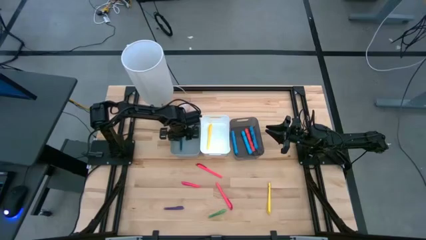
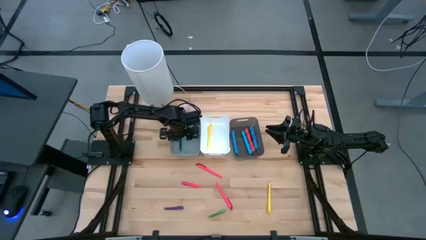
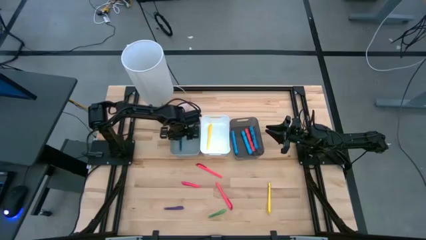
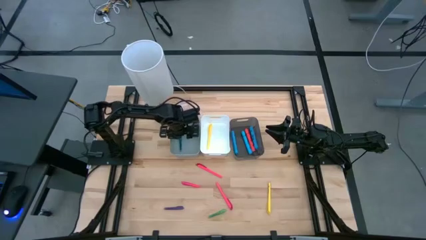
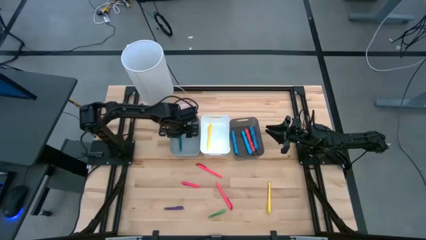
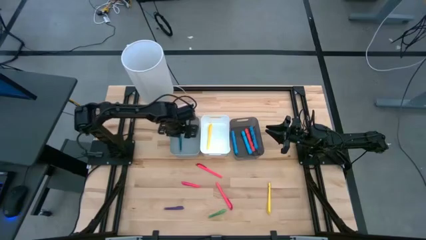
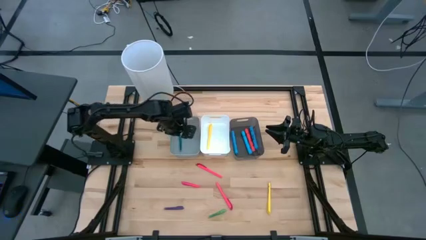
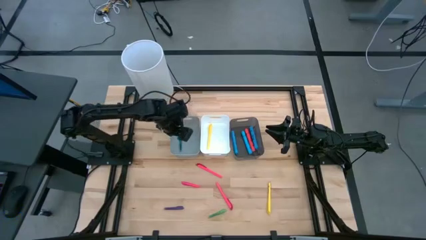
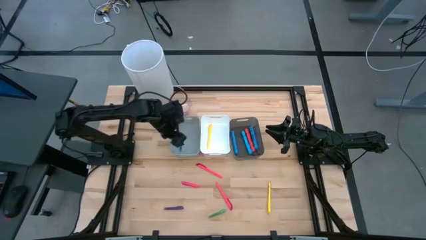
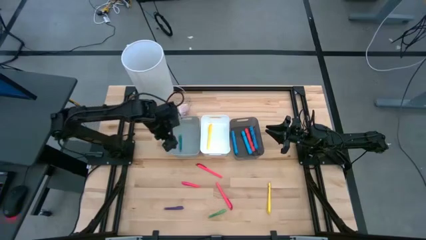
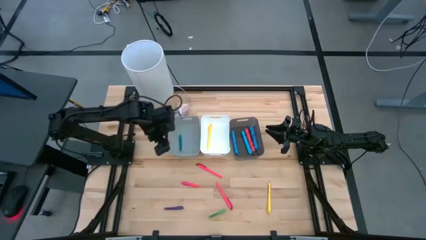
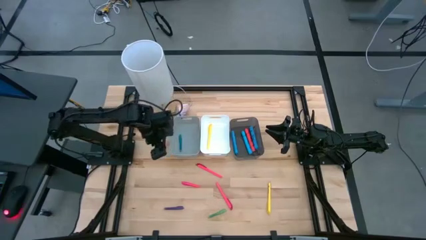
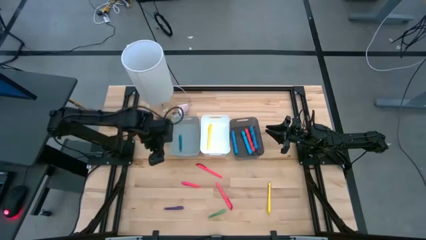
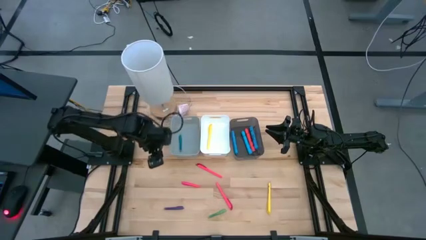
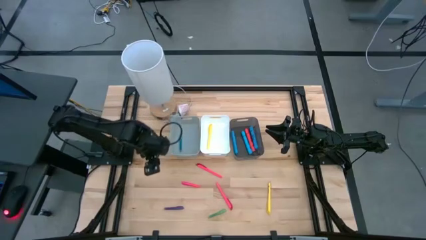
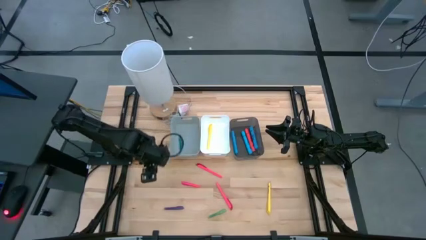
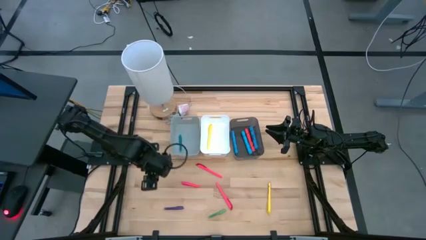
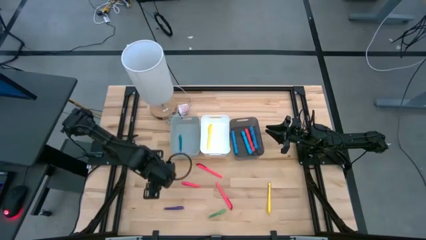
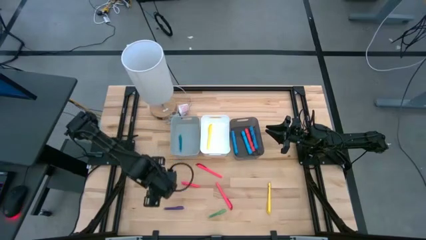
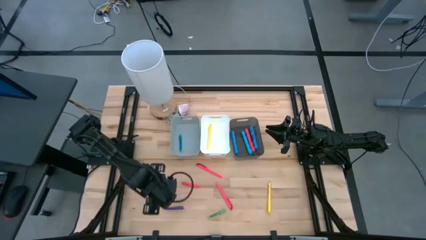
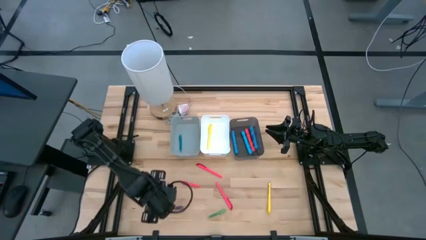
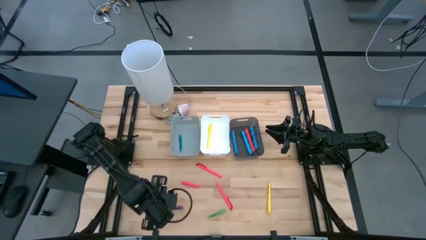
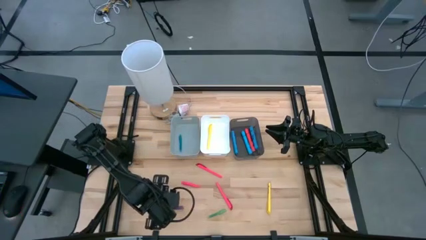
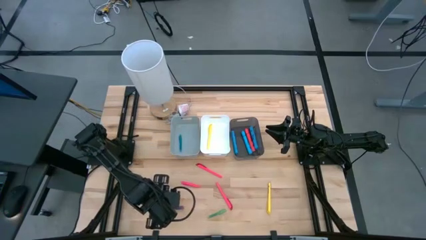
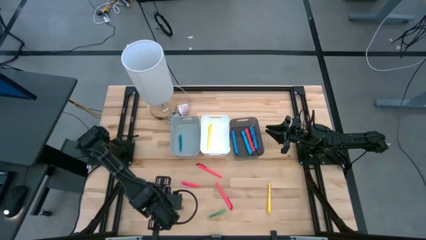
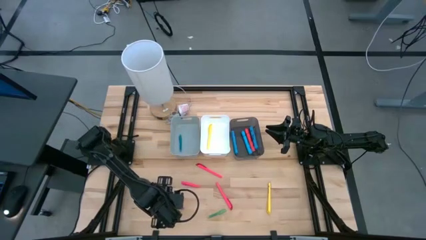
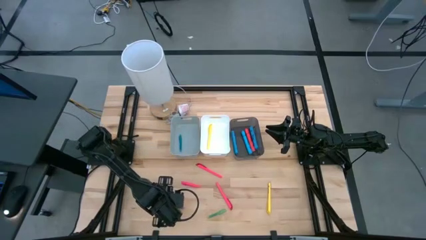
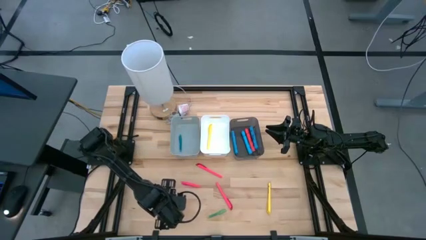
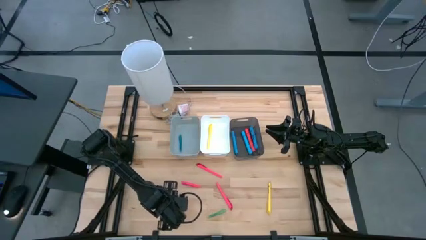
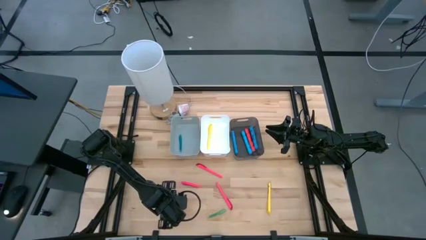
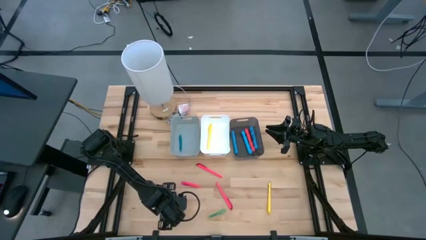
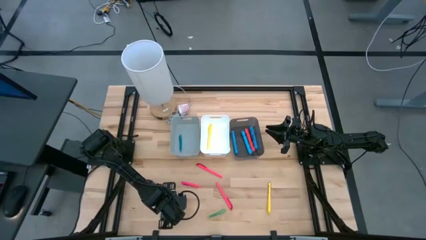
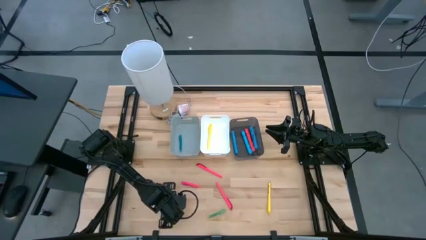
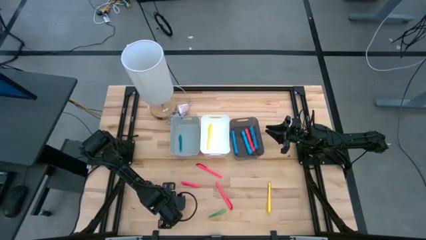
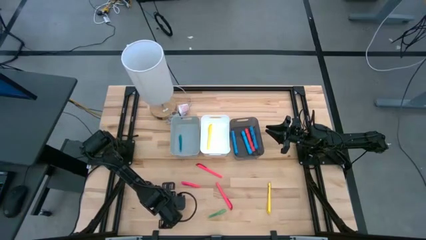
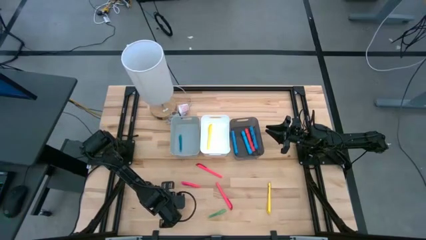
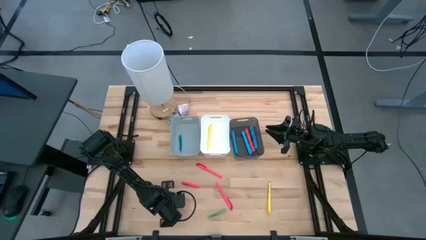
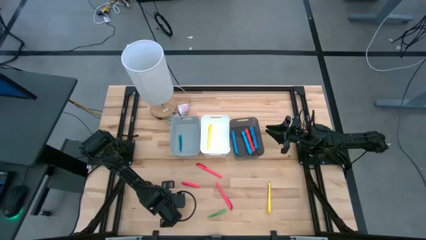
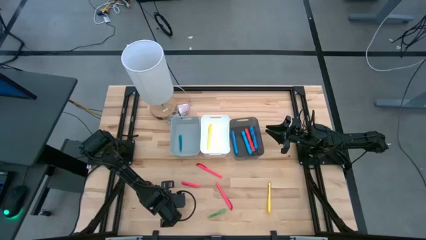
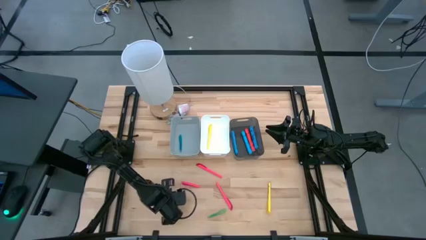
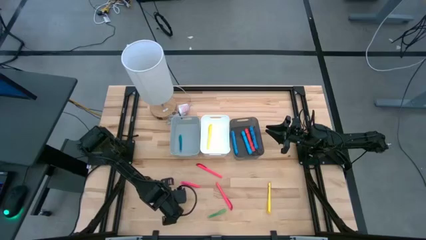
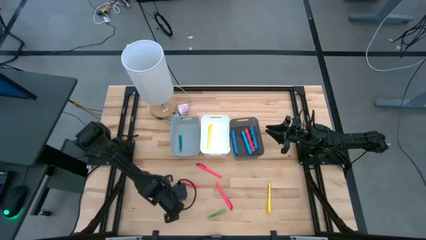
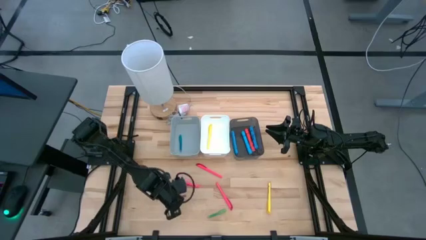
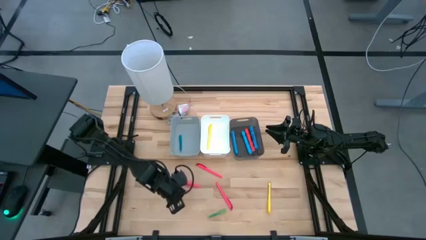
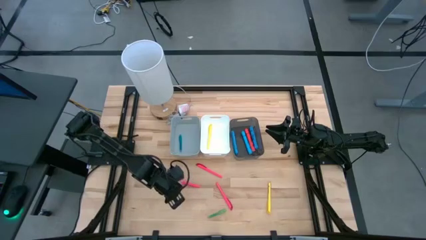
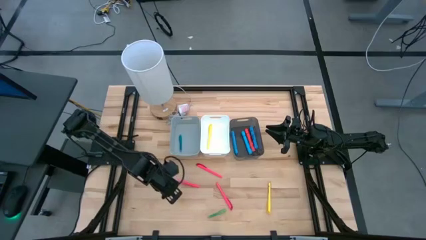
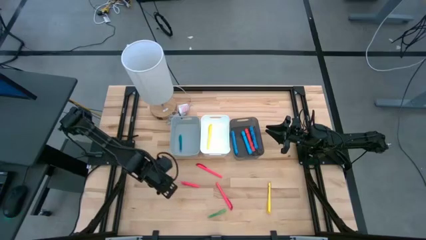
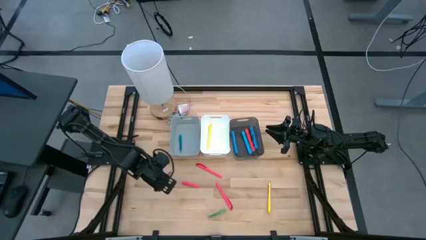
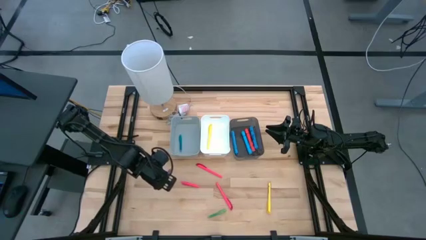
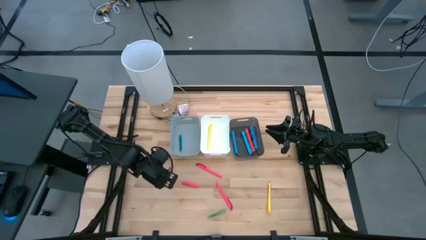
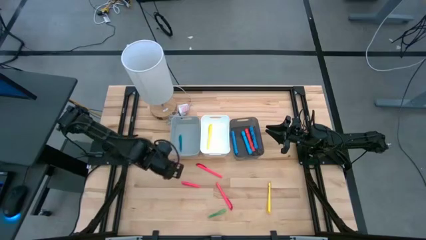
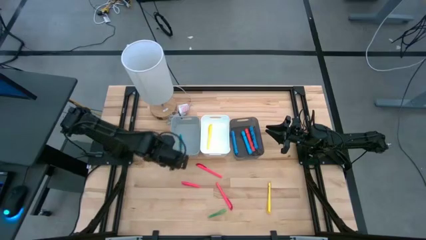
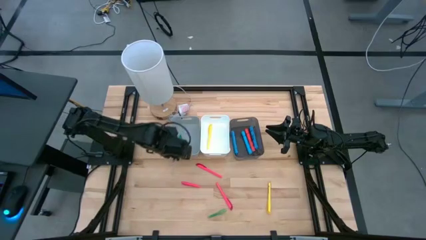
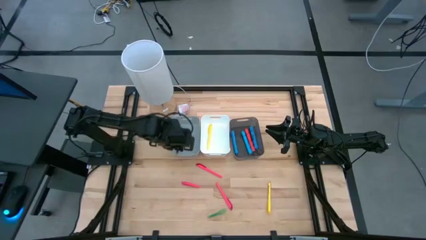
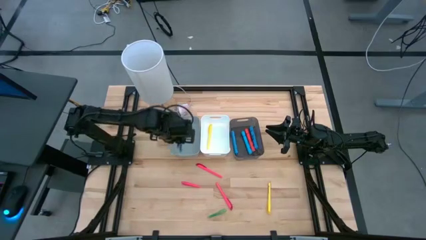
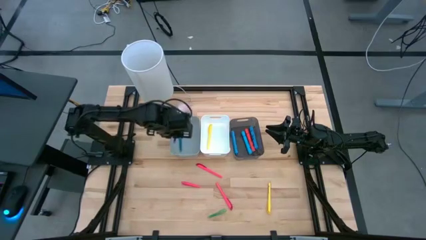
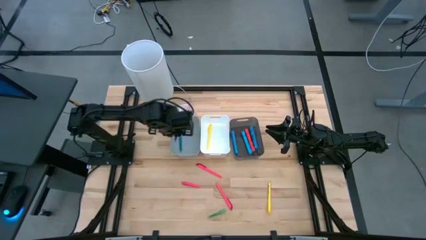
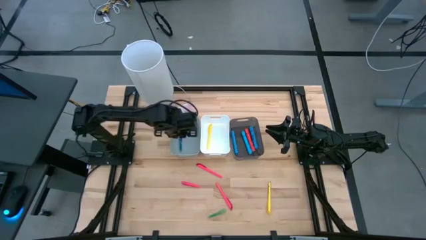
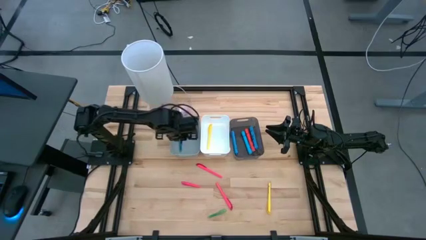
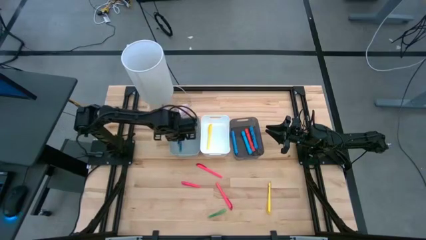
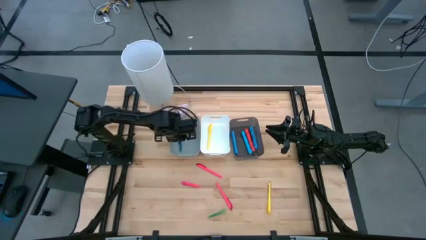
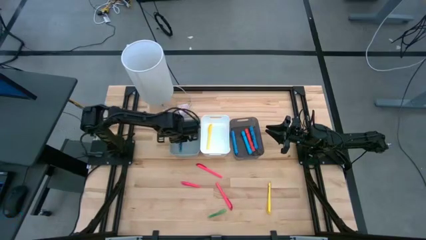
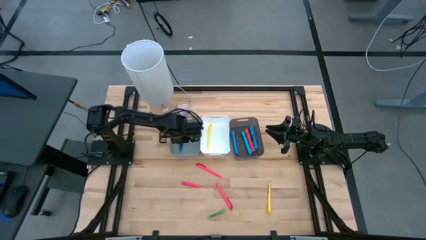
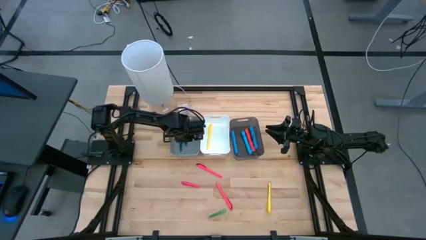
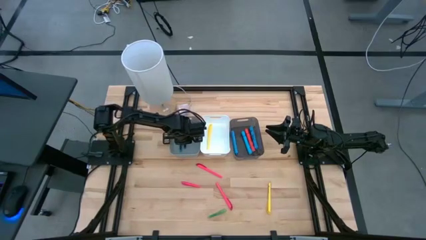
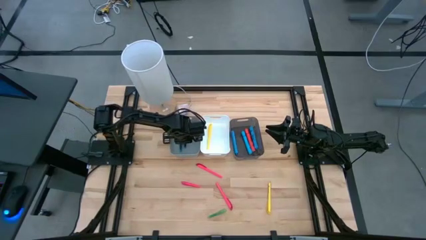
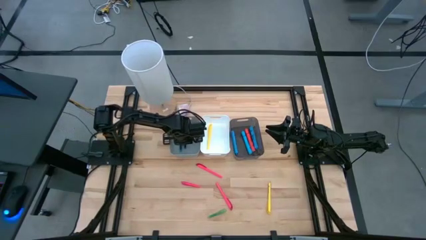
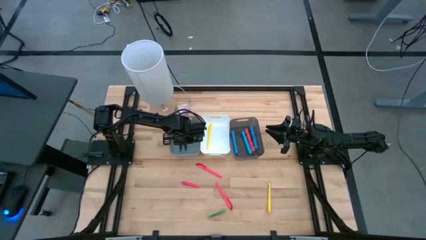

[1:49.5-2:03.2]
Task: Pick & Place Markers
Put the violet pen into the gray bin

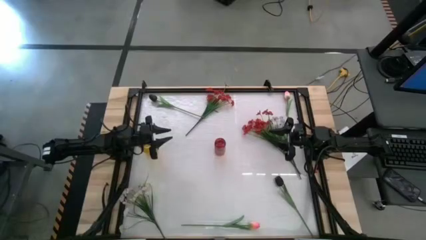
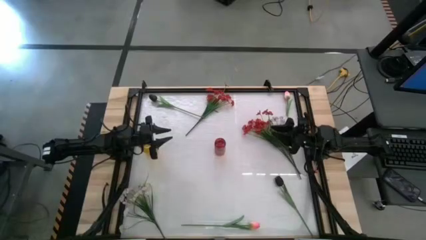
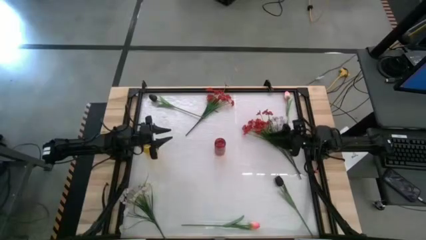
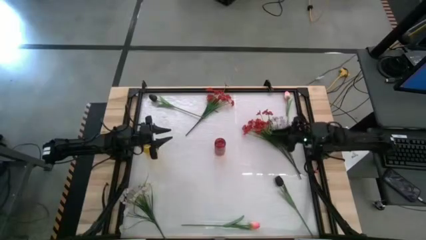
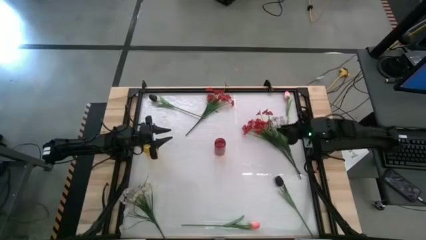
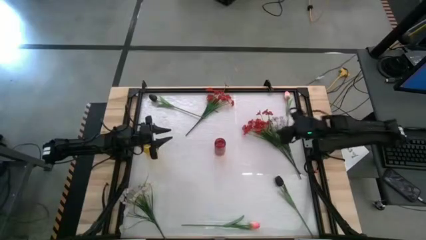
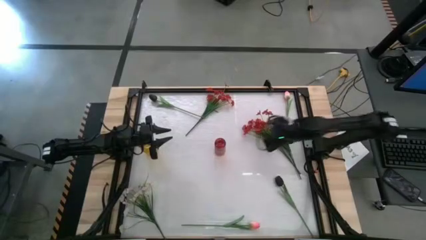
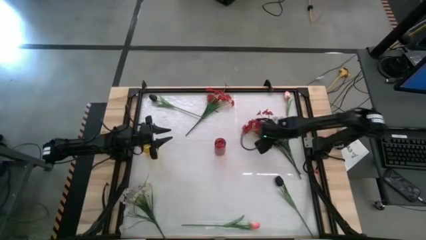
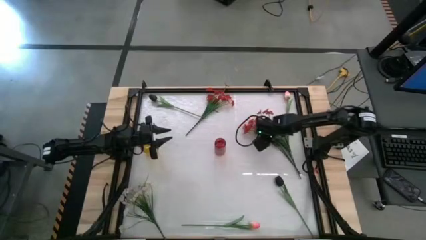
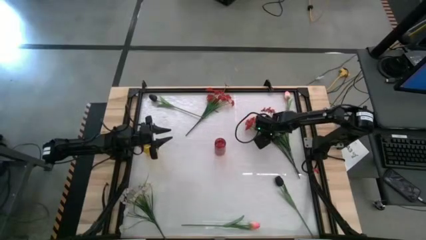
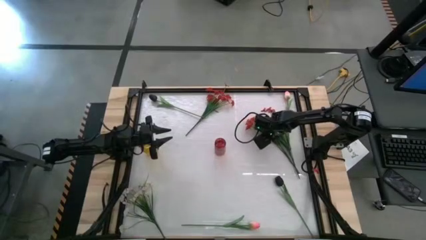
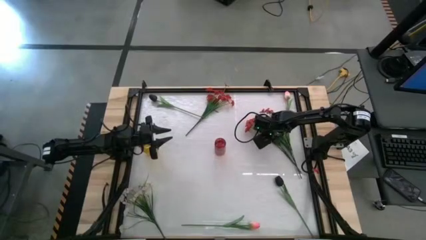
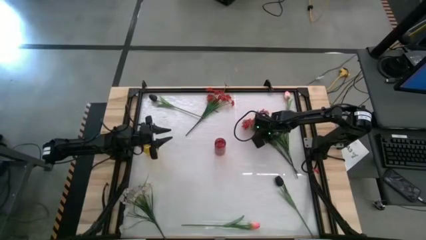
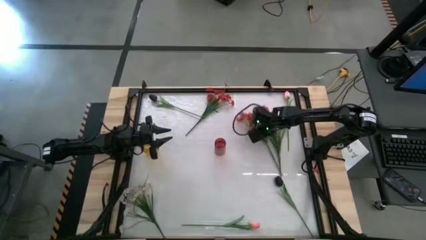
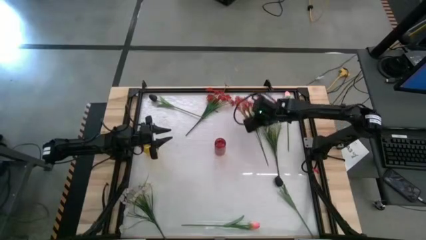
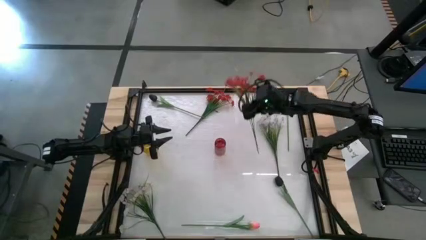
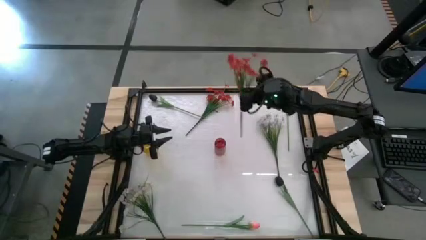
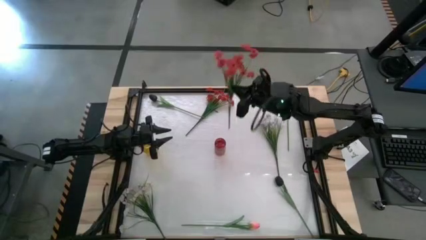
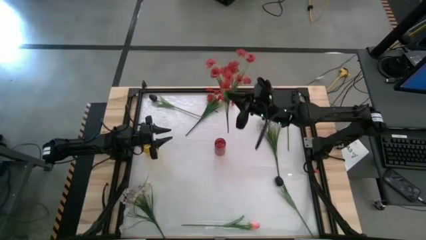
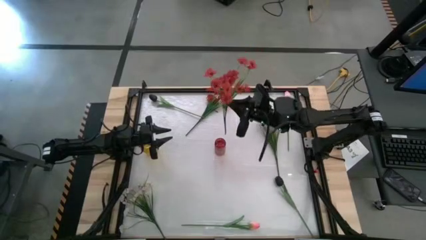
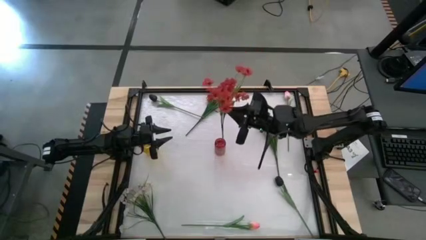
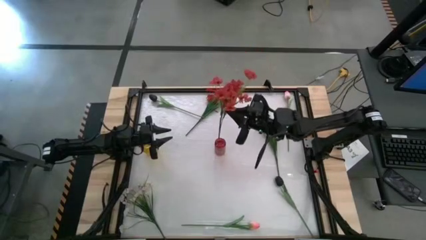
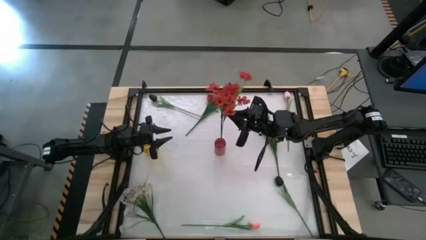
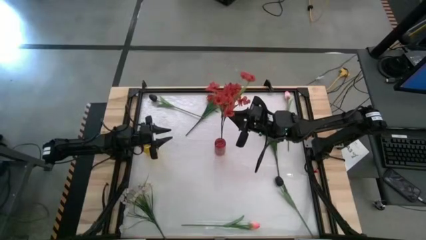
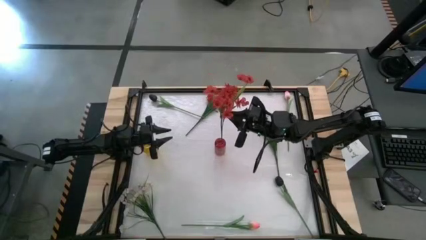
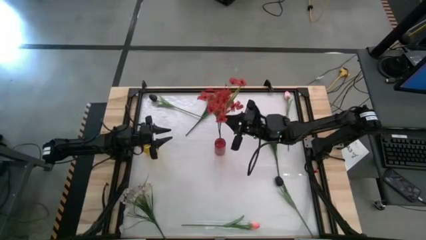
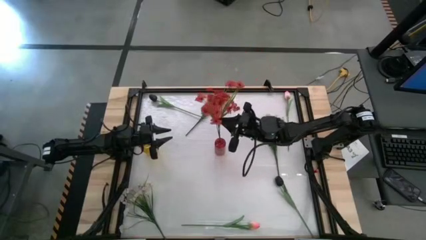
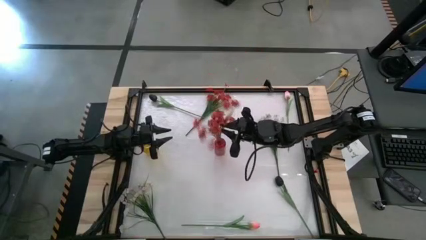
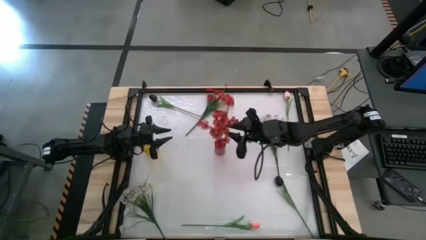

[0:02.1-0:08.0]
Task: Sort flowers into vase by color
Put the right red flowers into the red vase
